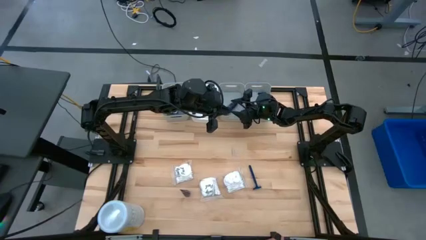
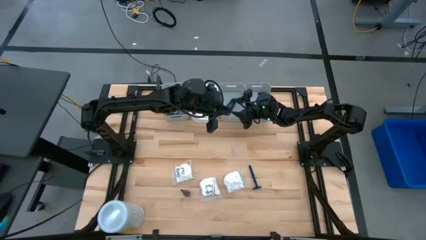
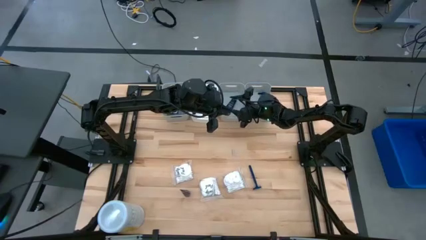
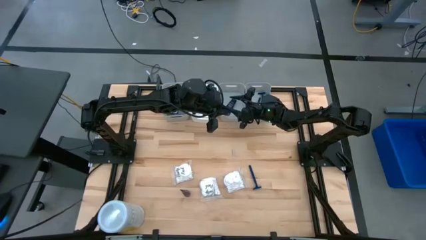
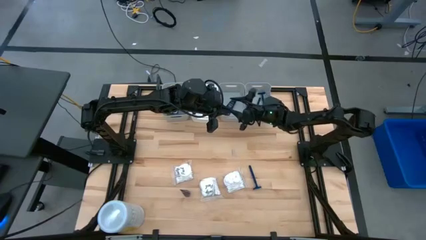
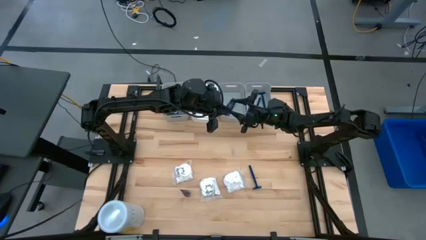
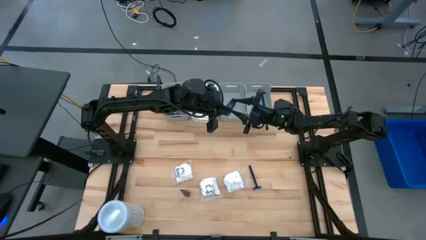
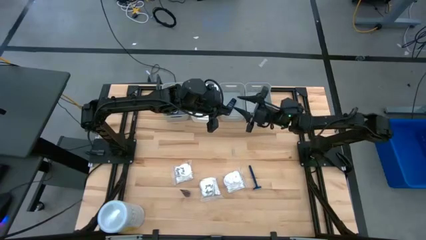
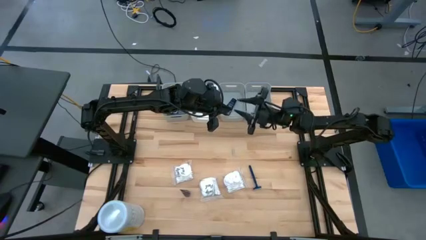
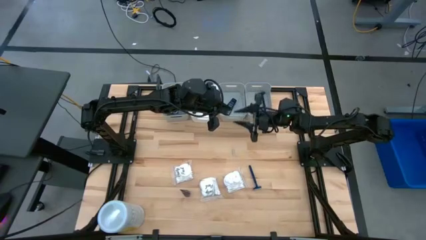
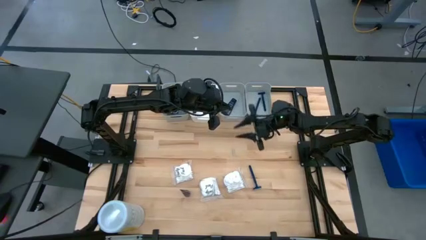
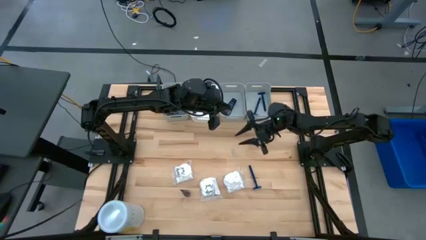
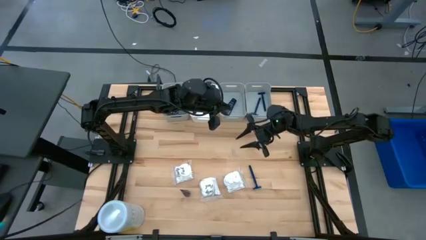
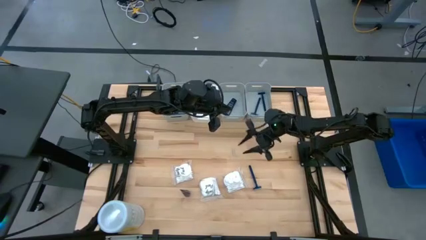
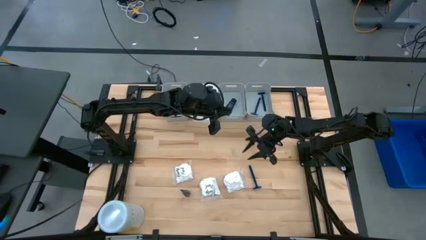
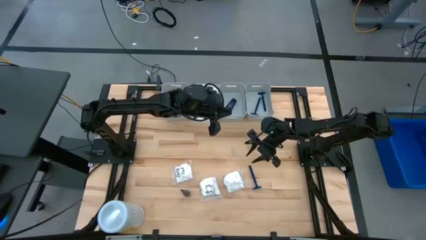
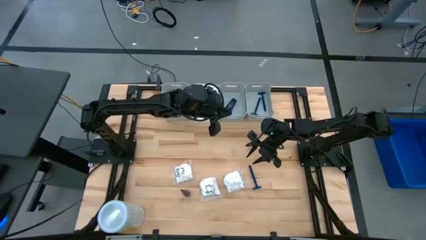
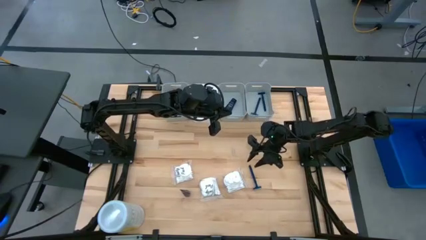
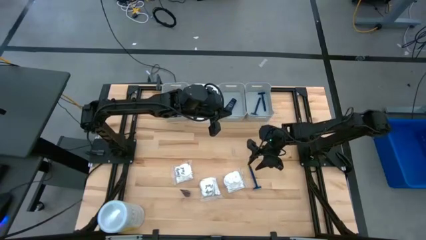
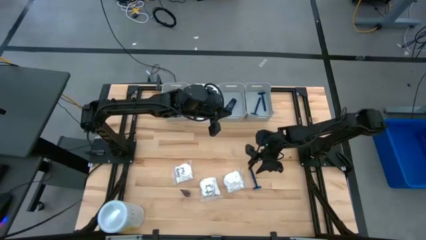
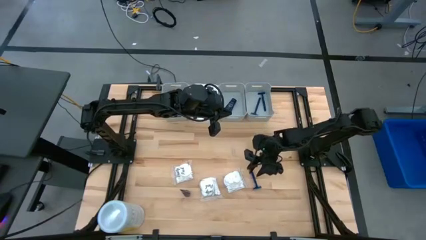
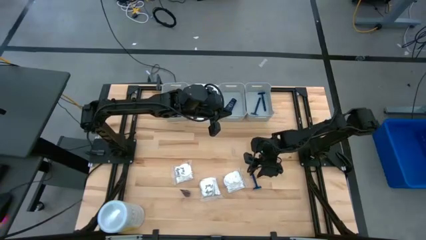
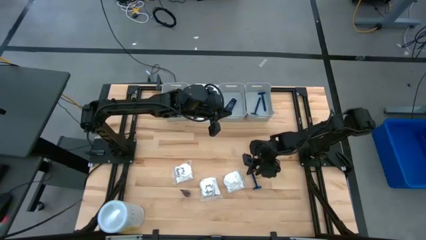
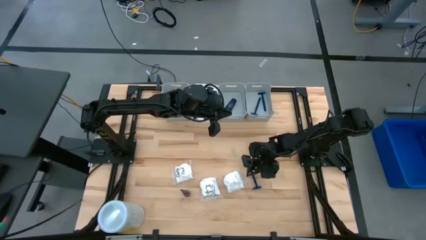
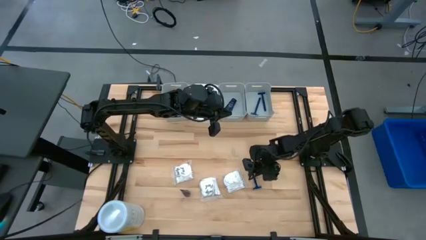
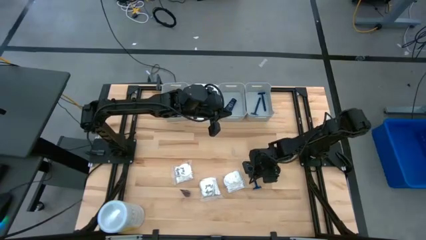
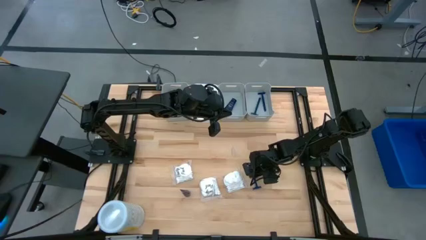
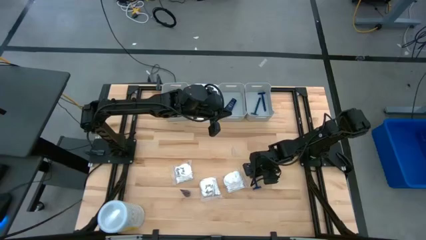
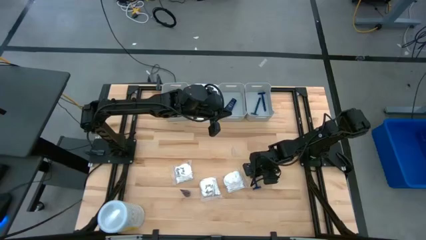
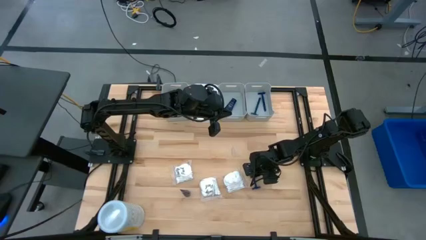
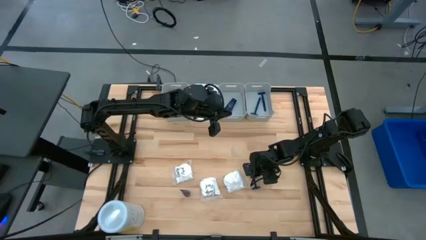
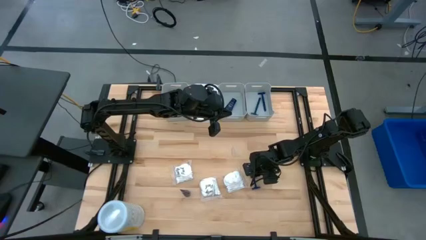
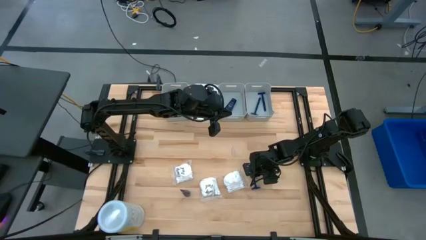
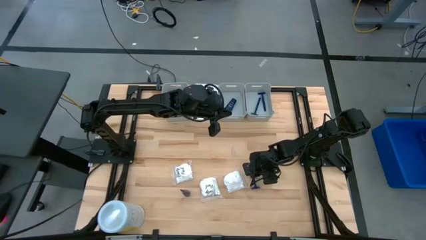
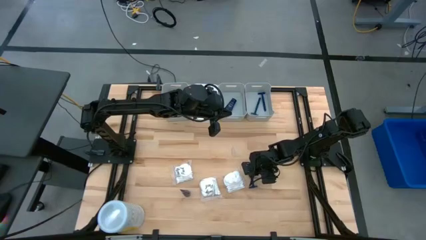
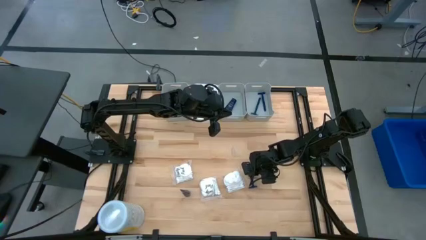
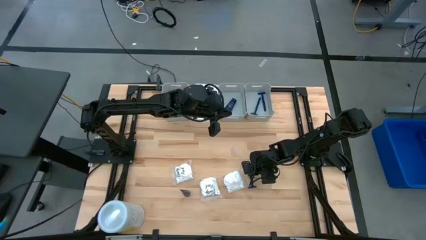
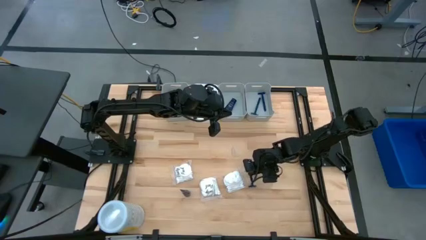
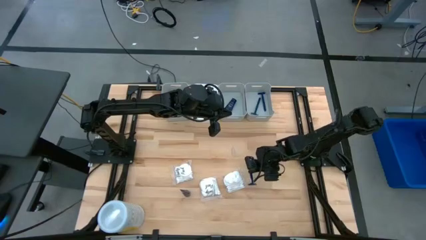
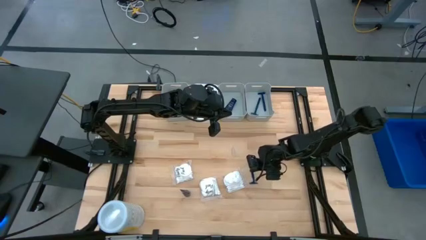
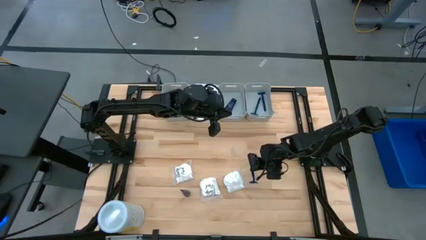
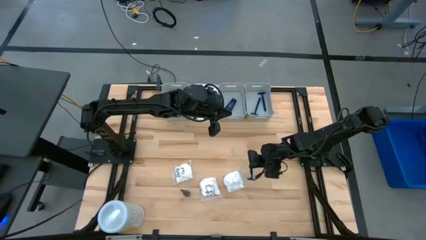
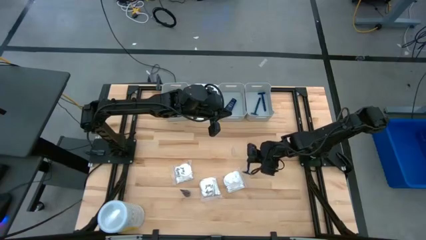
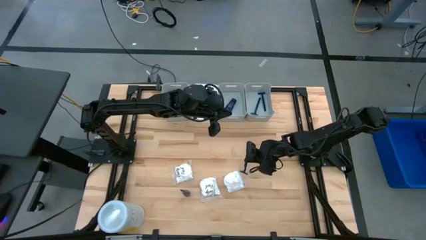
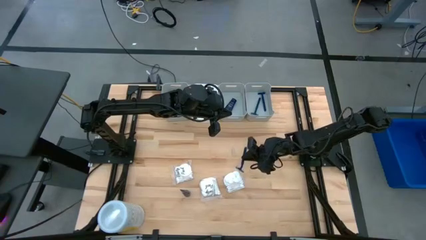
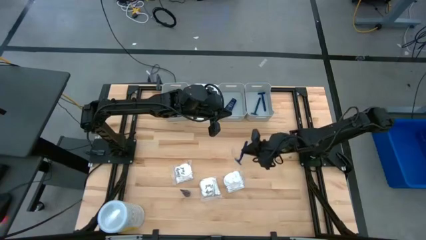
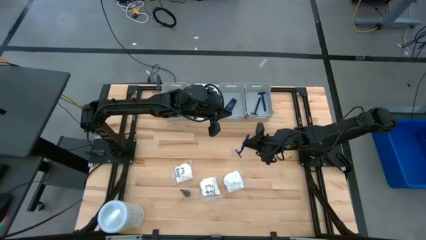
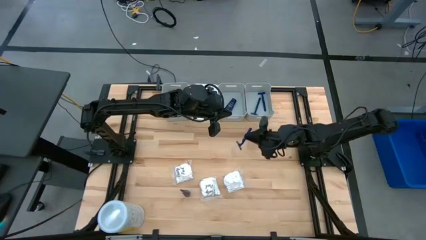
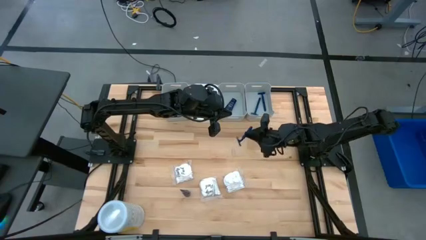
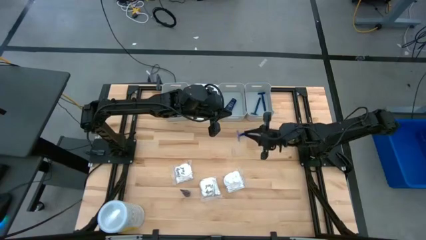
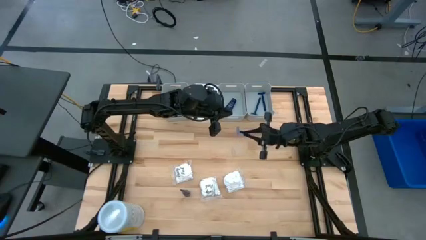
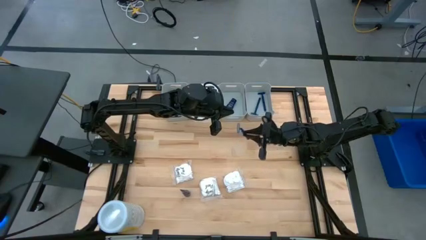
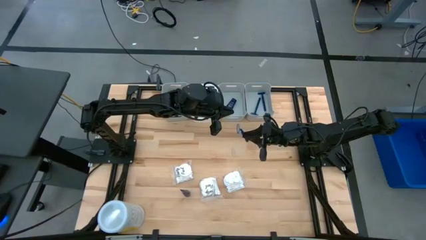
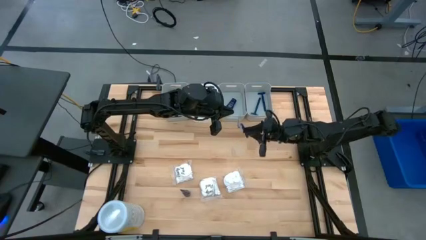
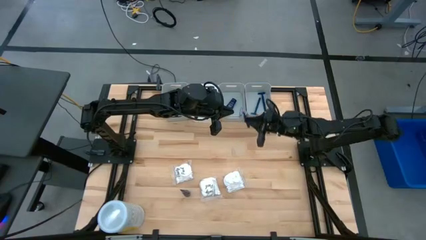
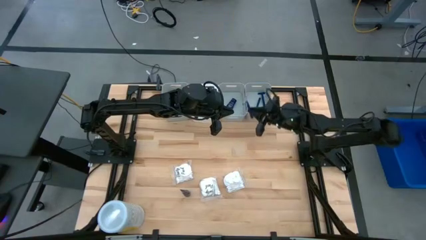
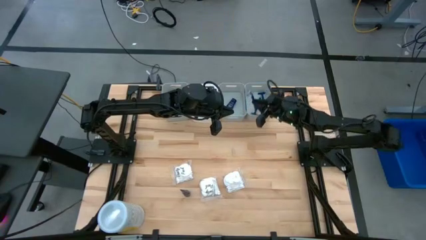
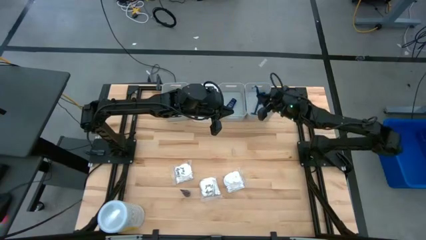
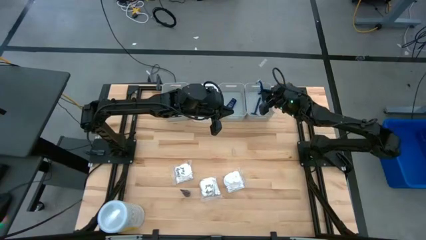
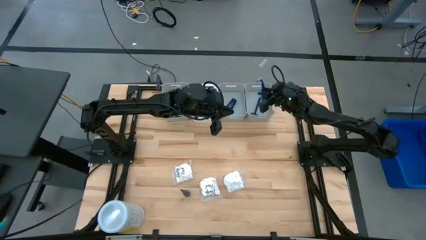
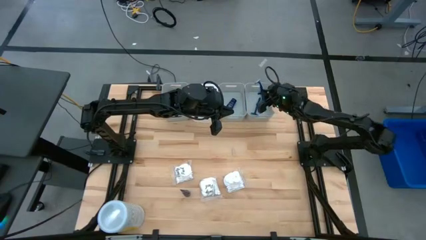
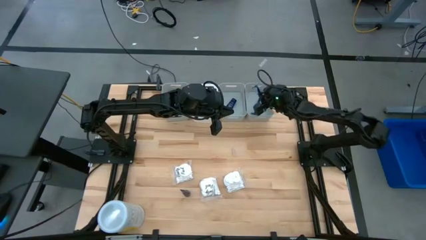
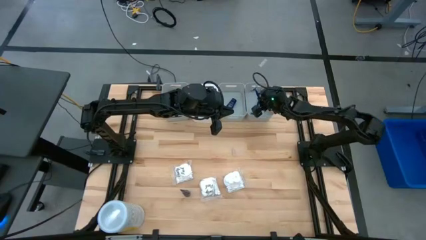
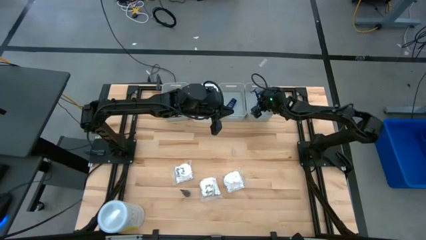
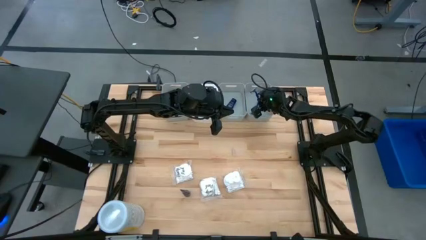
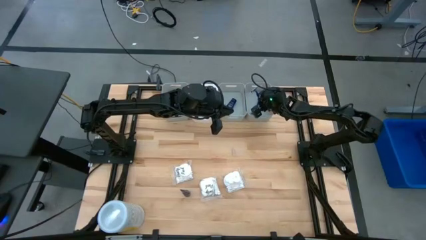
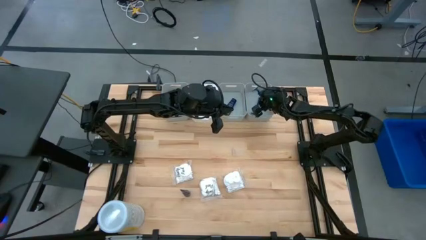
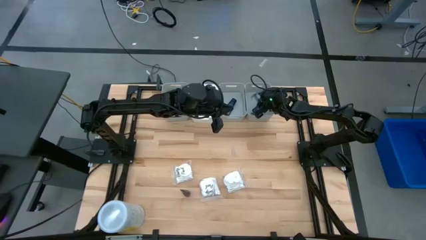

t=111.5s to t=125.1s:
Task: Pick & Place Travel size toiletries
Put the blue razor into the right gray bin
